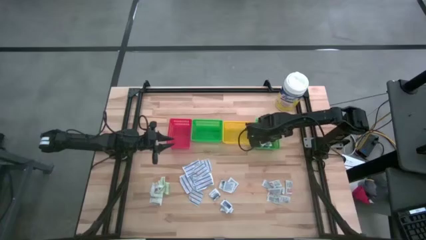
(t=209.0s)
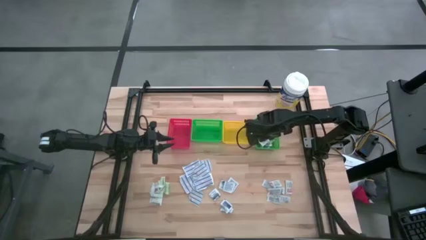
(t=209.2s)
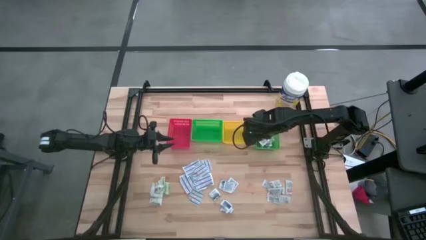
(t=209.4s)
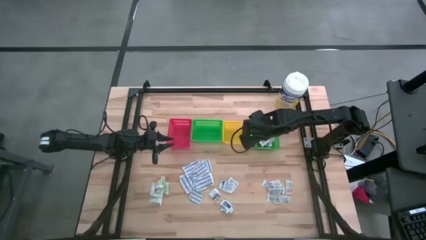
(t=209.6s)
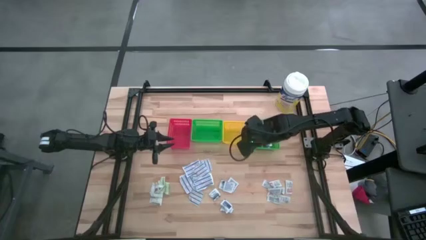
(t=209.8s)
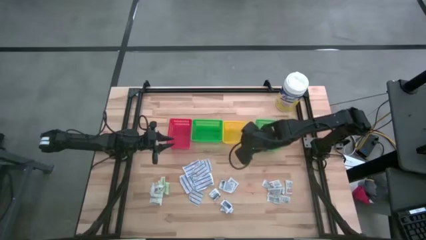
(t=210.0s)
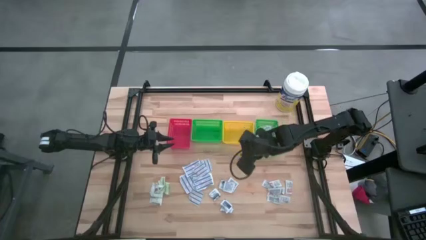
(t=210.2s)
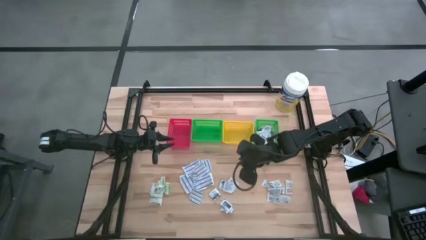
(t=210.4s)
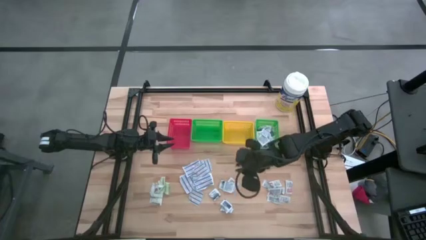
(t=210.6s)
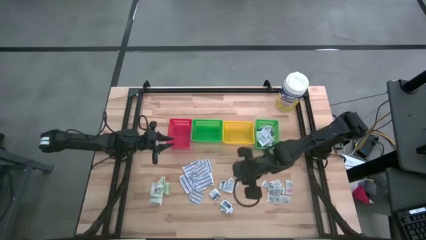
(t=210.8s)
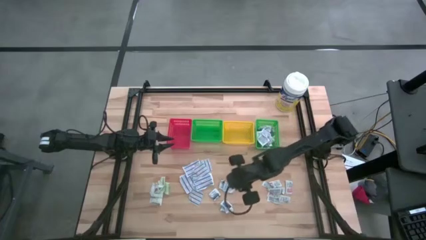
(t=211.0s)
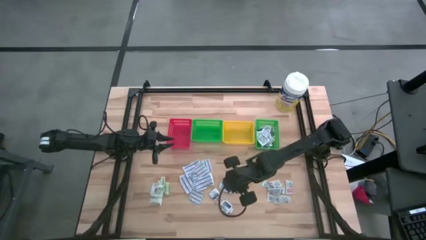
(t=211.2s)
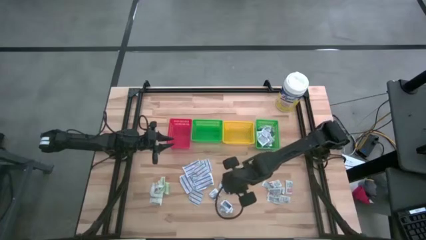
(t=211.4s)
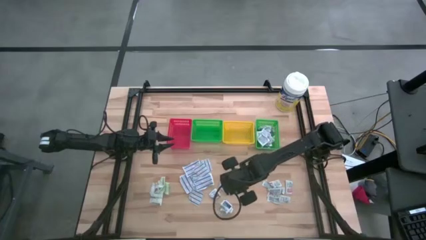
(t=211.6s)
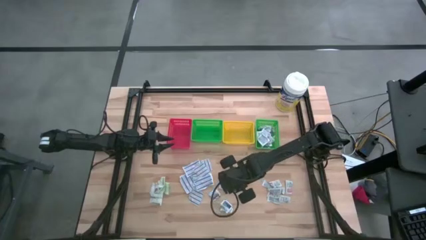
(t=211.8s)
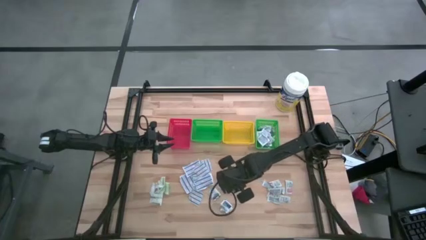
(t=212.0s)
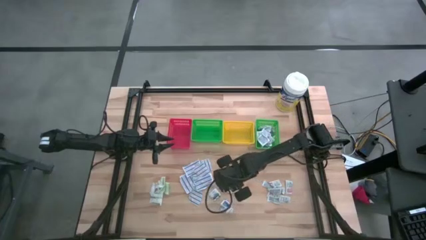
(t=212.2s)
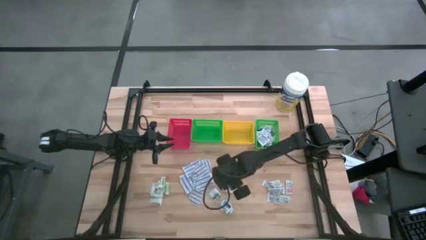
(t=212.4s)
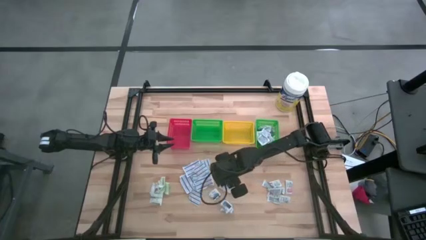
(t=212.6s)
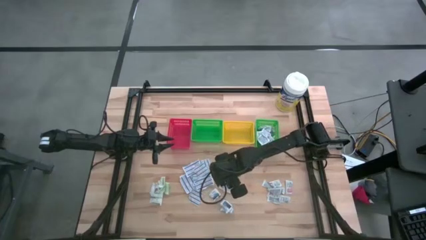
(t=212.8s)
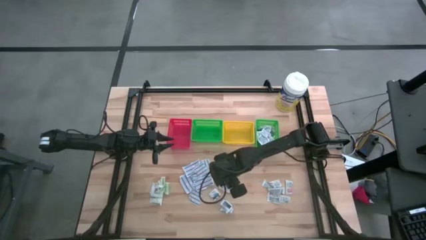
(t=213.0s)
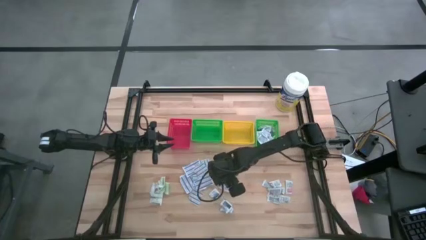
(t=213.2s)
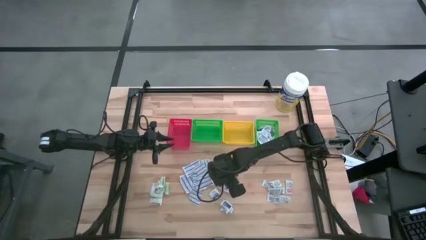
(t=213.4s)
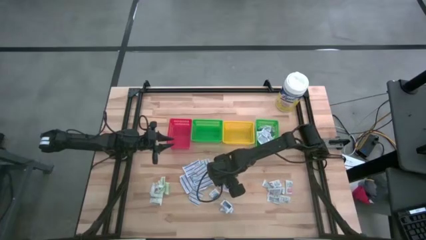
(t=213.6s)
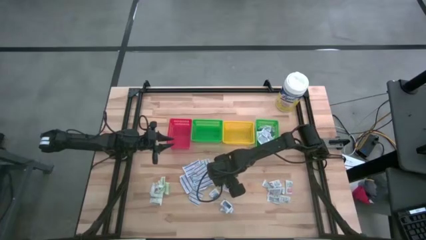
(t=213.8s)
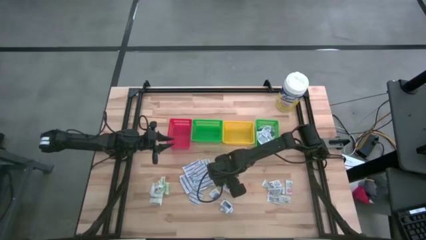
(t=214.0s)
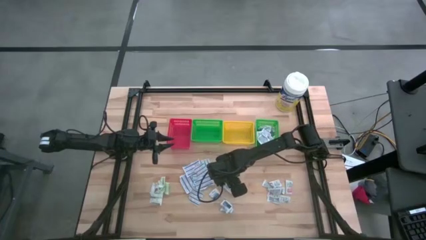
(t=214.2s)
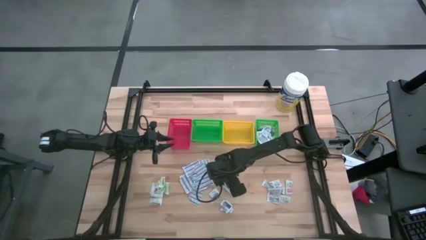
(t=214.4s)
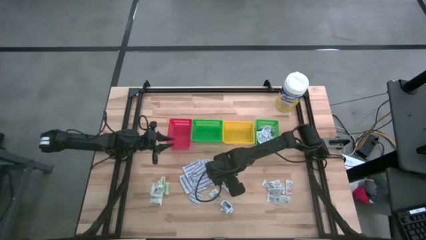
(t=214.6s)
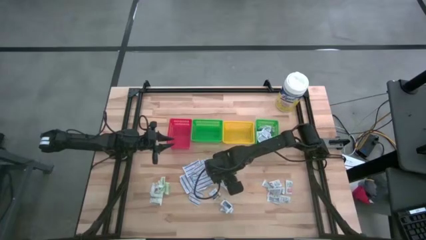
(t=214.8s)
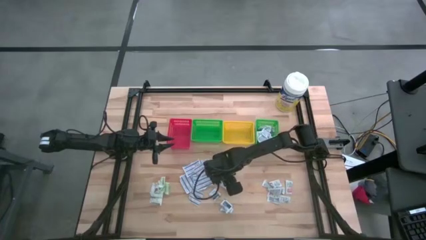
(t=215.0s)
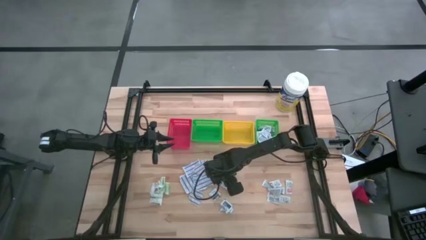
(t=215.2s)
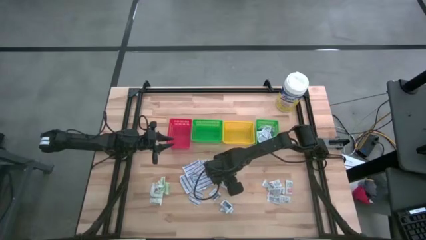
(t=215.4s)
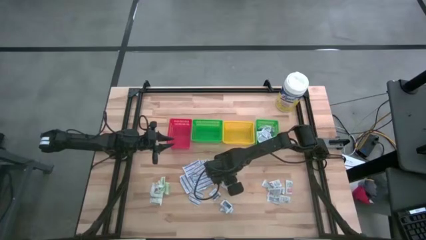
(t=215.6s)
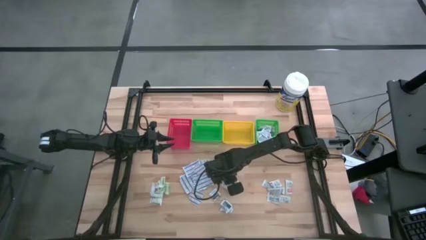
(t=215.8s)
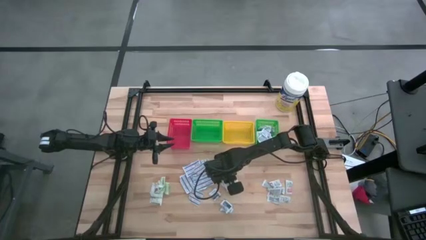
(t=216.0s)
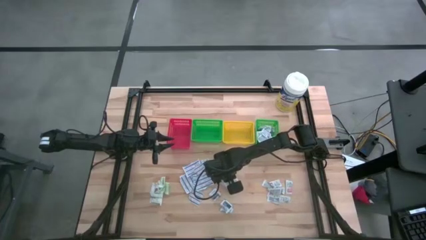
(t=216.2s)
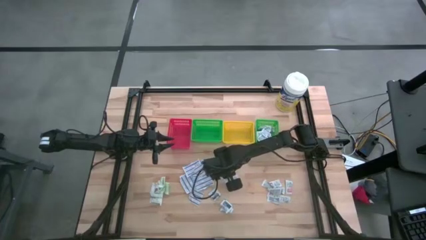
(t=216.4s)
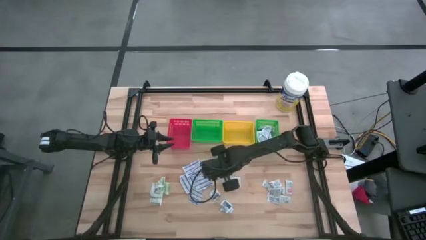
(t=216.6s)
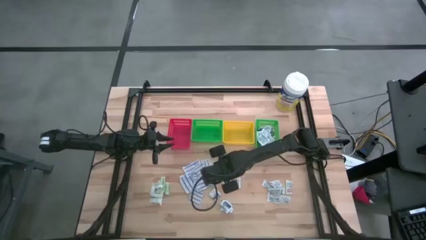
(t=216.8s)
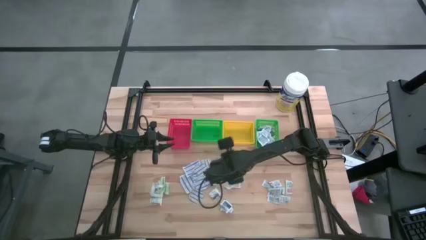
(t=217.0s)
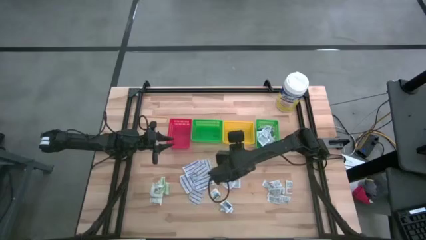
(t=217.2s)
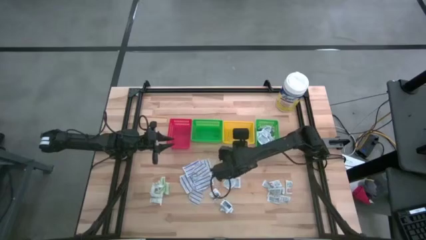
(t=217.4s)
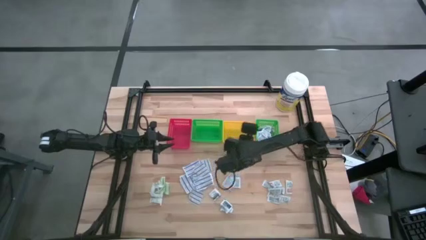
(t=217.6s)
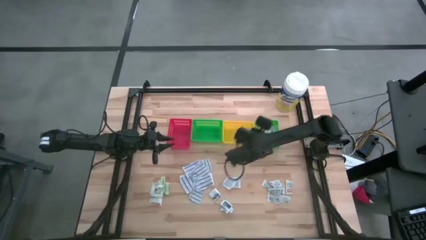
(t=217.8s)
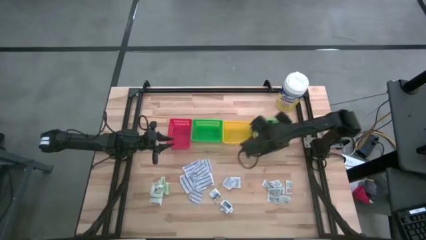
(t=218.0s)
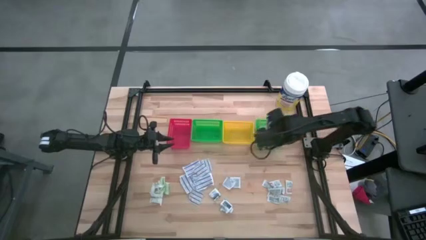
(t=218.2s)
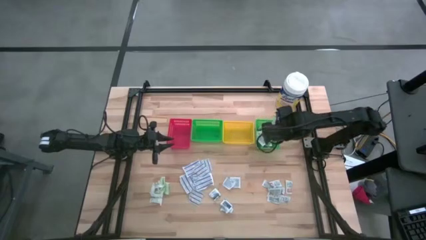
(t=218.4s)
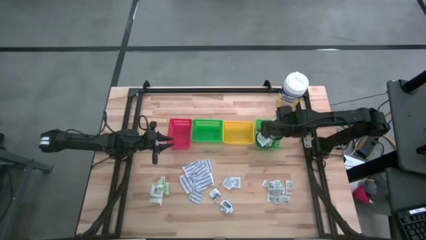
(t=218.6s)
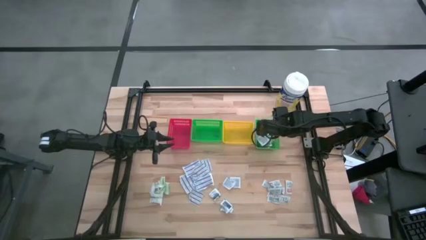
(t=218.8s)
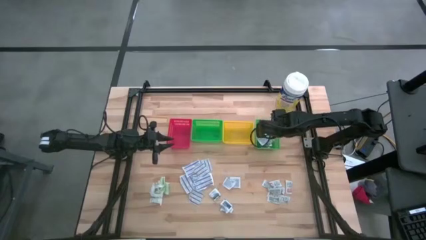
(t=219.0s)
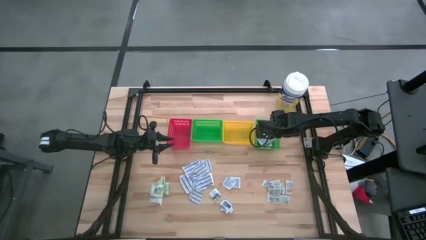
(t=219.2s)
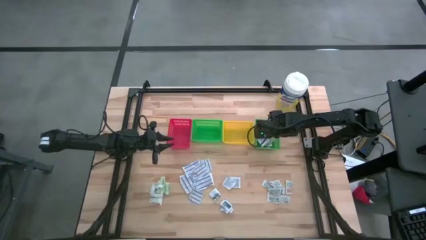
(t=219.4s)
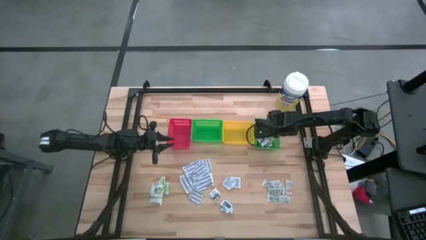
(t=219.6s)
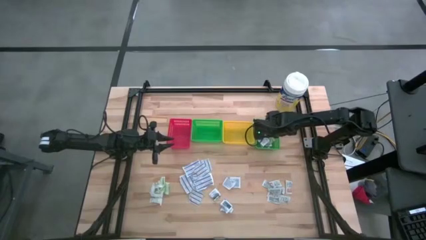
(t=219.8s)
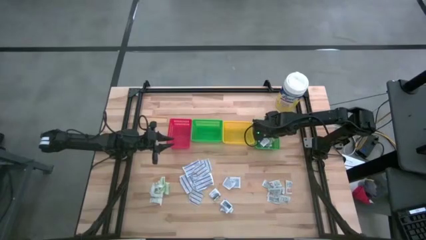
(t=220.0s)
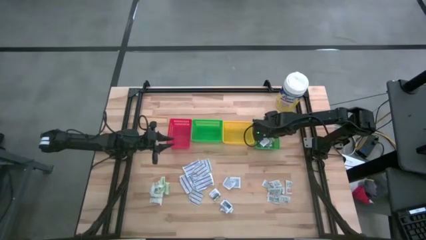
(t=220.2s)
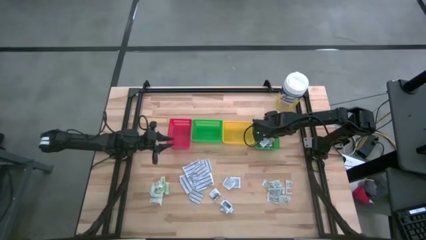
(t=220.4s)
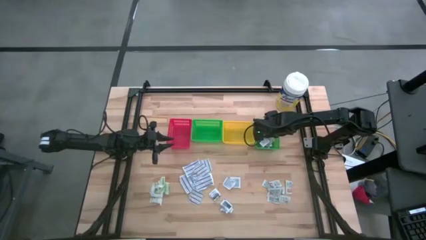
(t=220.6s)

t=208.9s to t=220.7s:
Task: Pick & Place First Aid Supplies
Put the blue alcohol pad into the right green bin

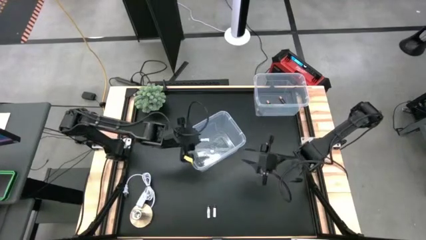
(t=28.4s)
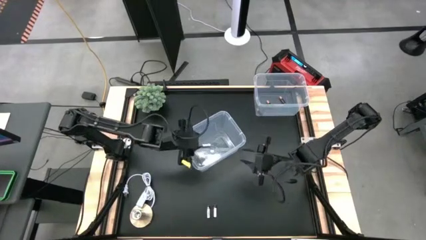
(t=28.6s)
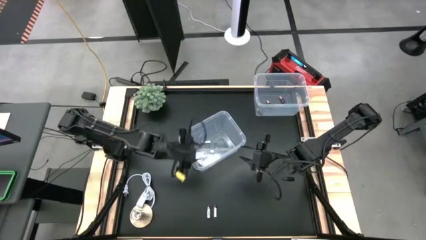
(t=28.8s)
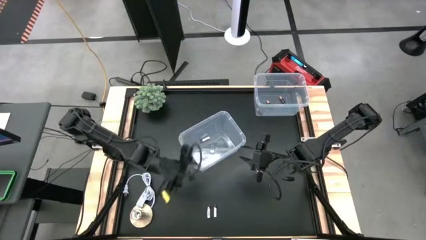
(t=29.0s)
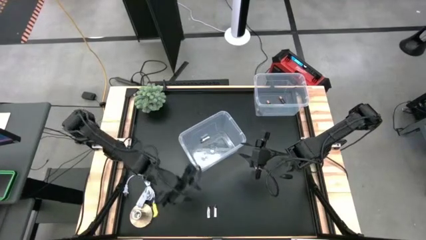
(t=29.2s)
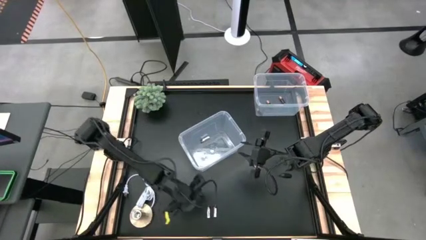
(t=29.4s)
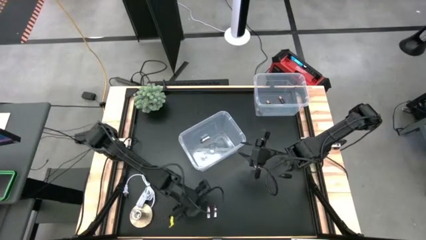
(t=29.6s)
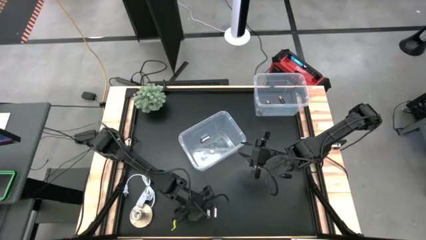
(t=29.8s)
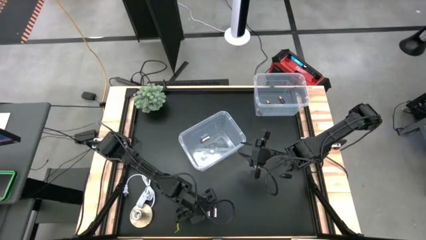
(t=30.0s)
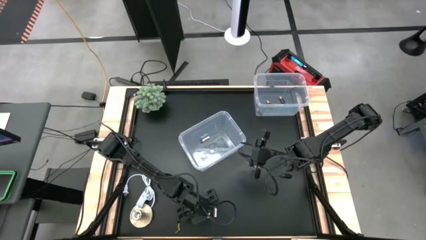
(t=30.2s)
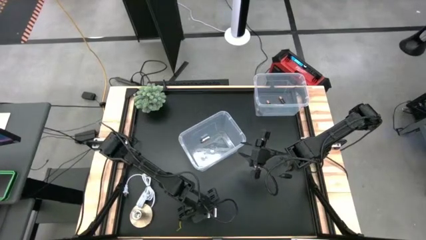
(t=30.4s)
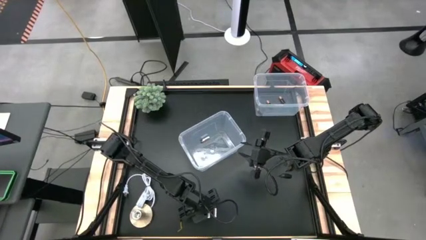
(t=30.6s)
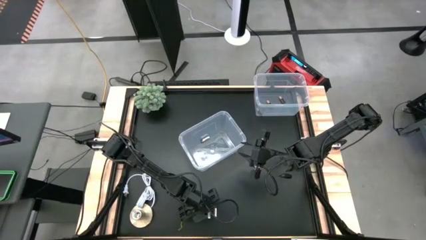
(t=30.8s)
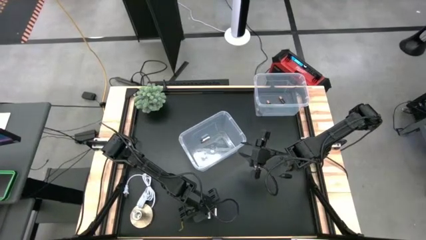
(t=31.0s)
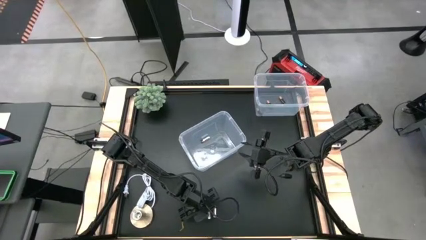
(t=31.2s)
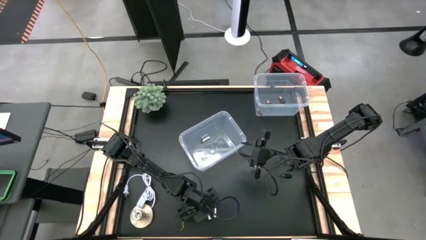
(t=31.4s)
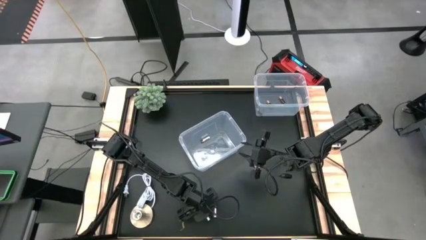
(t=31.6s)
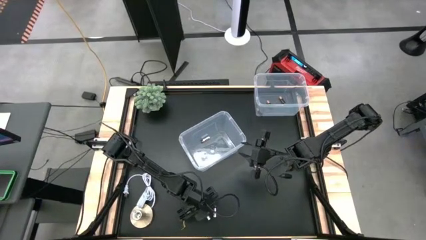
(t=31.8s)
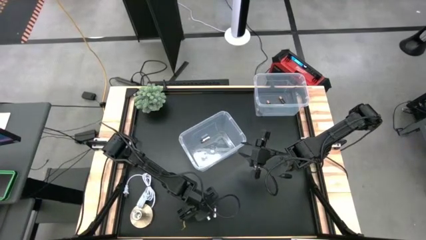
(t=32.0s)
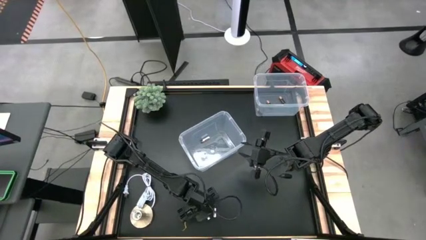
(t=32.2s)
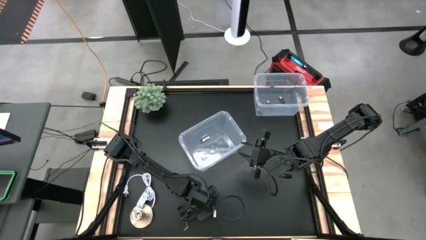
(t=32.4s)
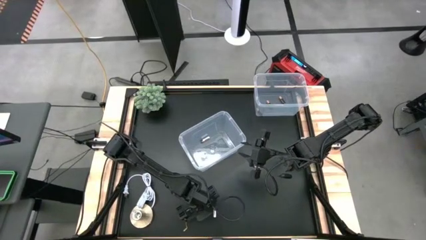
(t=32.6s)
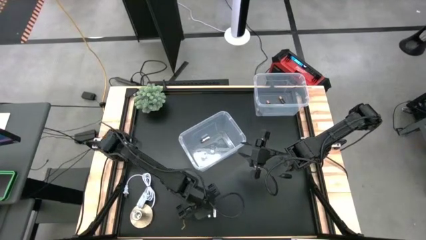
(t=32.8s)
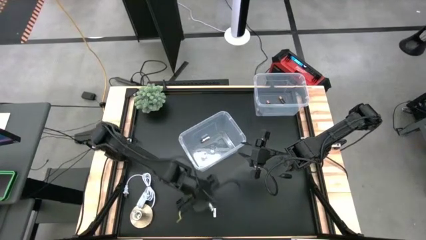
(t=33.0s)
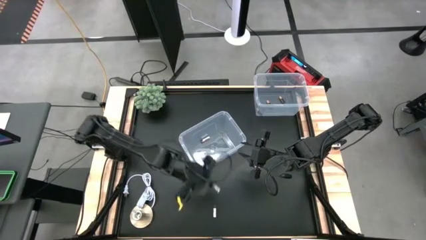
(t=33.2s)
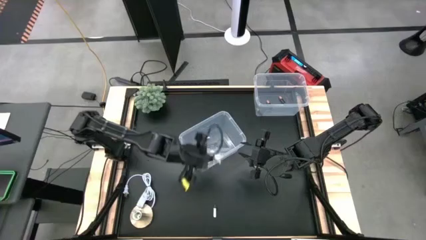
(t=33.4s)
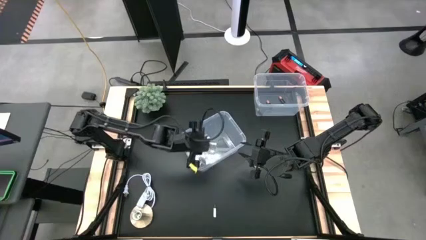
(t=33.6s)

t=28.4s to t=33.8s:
Task: Sort batteries
Put the left silver battery into the bottom transparent bin
